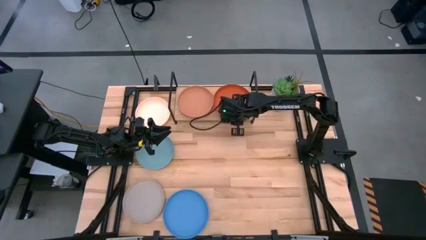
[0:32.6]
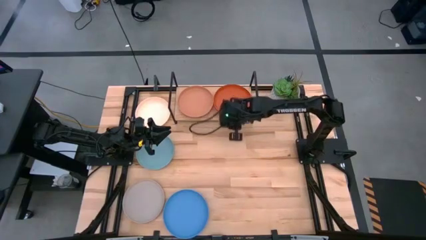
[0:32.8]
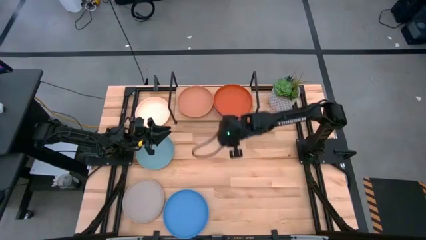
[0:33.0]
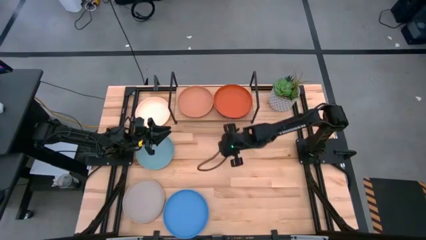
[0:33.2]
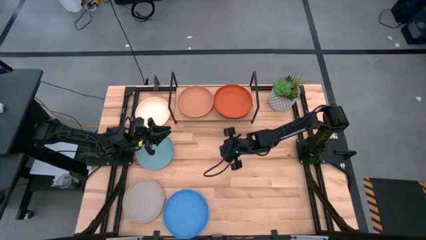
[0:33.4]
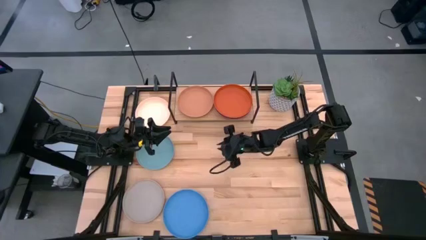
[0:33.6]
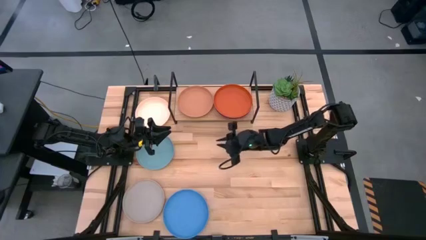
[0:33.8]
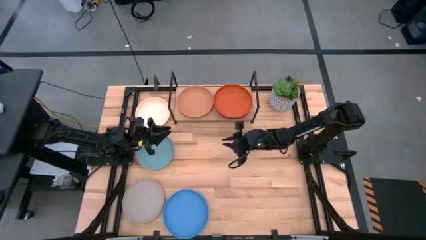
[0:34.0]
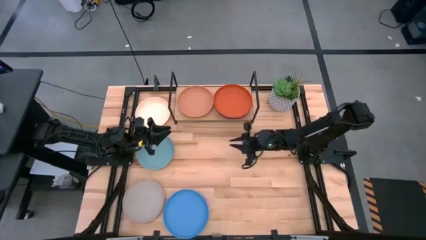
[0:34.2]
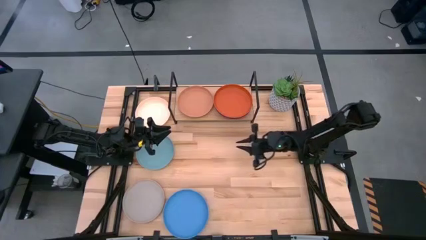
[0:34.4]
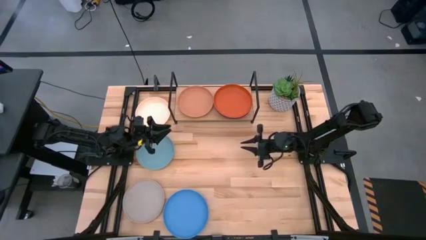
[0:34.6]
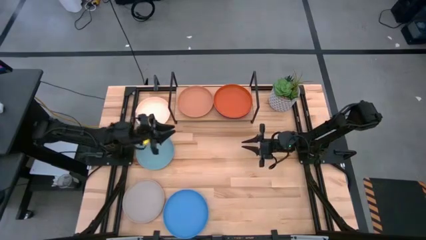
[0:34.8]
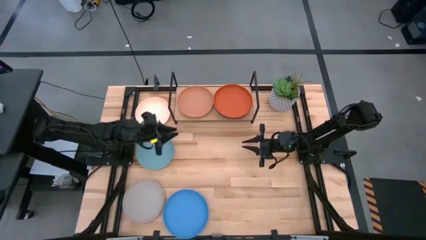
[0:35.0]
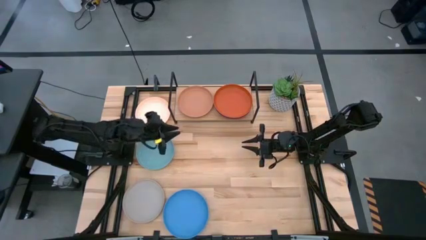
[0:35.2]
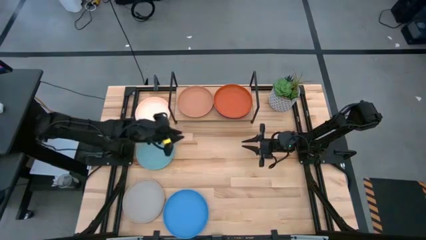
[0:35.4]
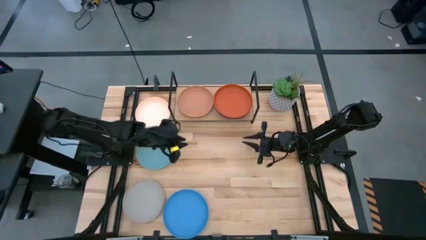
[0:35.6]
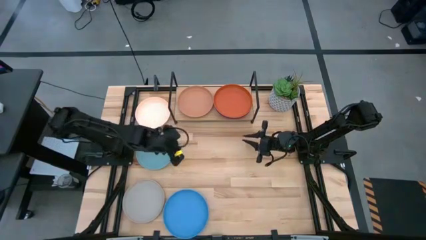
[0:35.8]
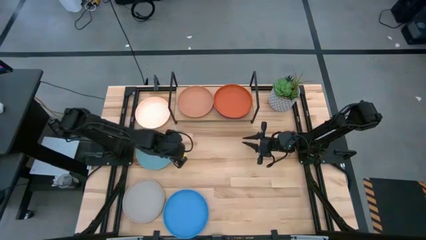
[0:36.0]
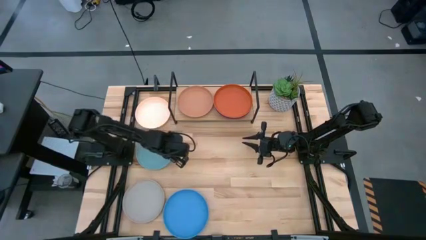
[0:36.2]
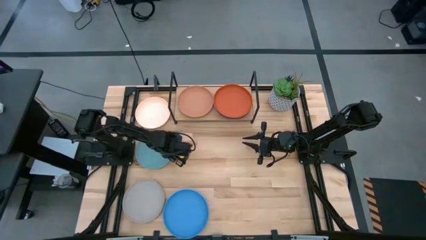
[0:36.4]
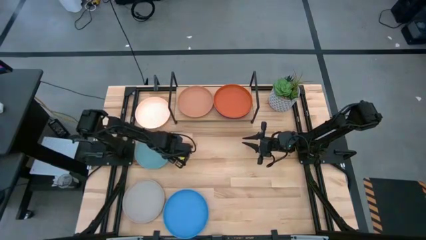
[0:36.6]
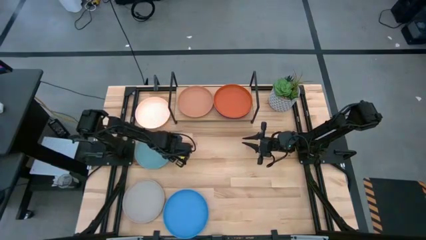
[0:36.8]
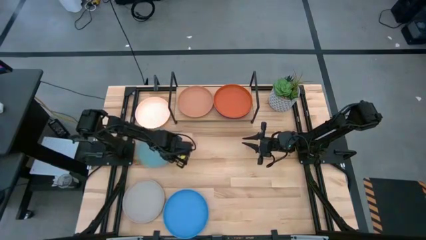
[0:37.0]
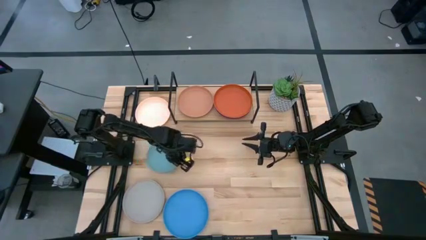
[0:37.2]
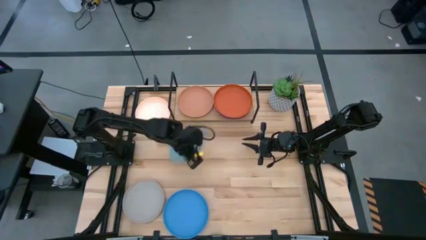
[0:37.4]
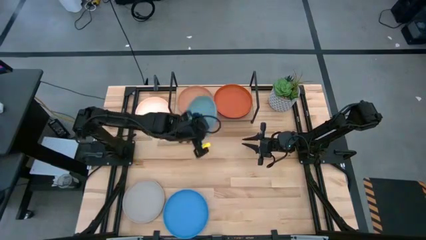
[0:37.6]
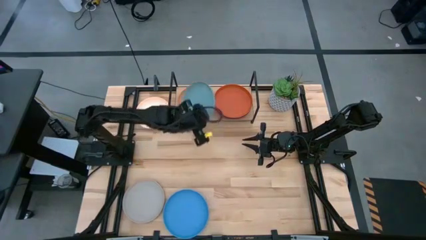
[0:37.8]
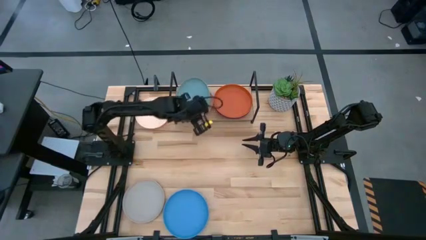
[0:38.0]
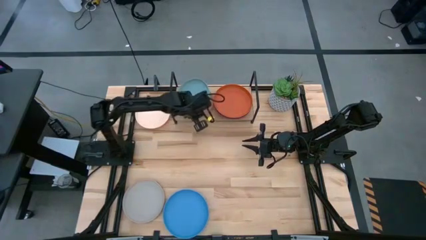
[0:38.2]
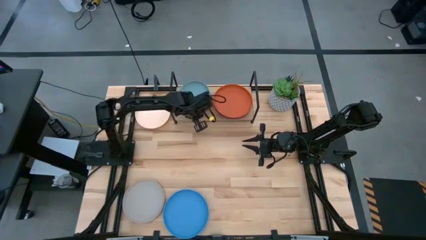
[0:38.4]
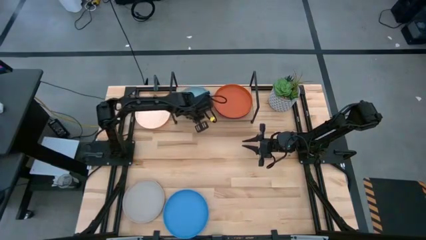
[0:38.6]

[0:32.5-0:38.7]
Task: Place and stack plates onto a shelf
Stack the light blue plate on top of the brown plate on the shelf

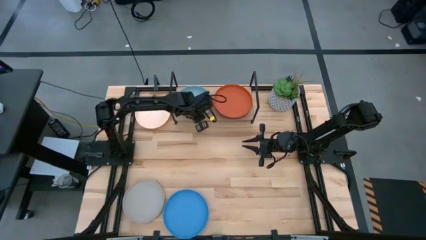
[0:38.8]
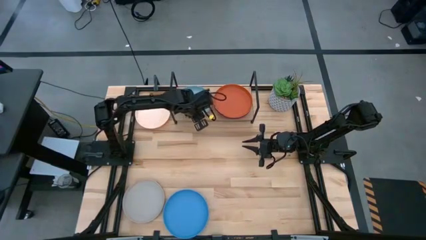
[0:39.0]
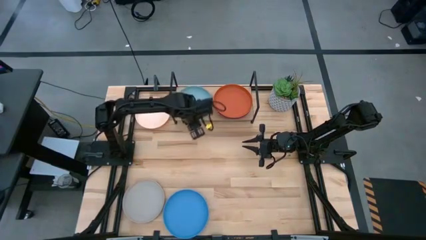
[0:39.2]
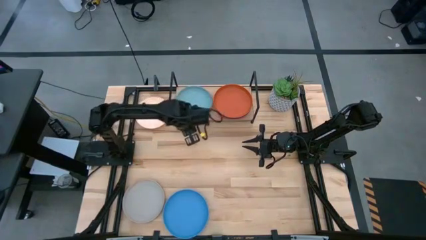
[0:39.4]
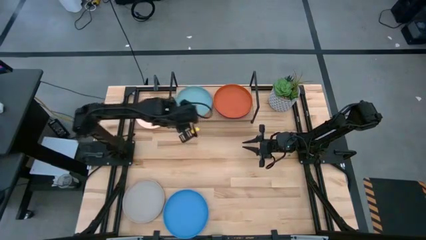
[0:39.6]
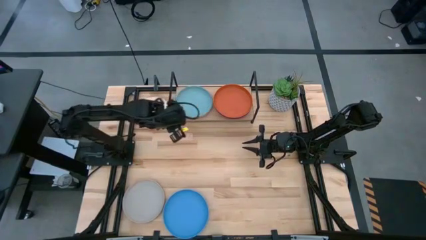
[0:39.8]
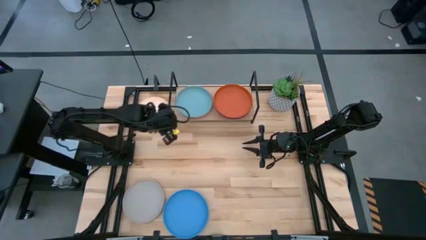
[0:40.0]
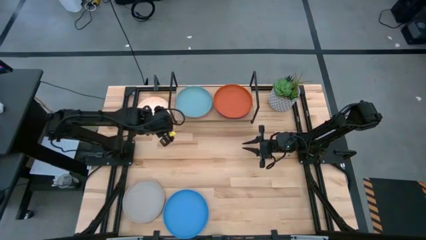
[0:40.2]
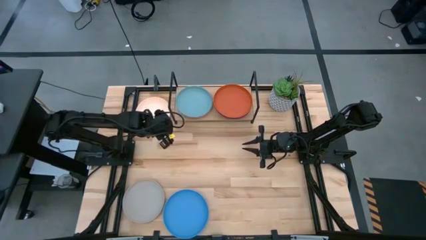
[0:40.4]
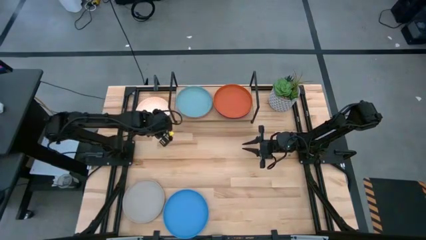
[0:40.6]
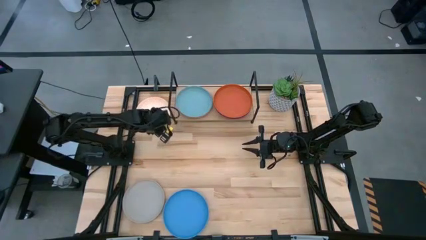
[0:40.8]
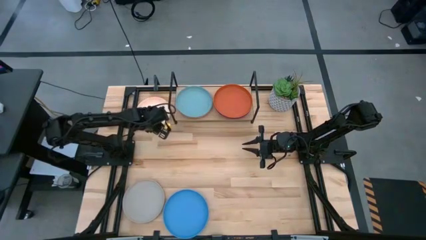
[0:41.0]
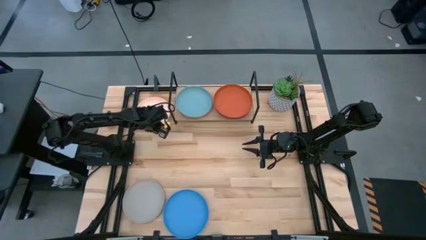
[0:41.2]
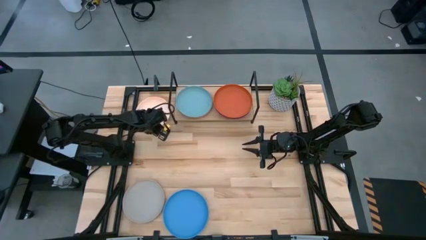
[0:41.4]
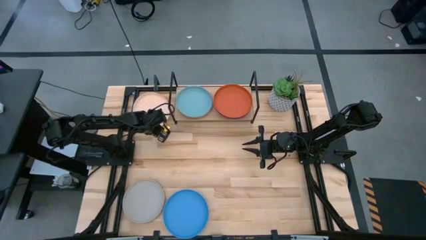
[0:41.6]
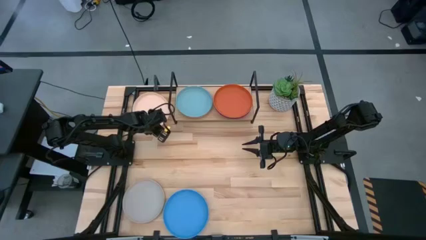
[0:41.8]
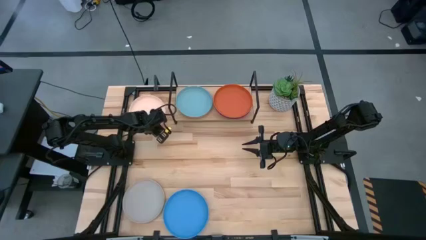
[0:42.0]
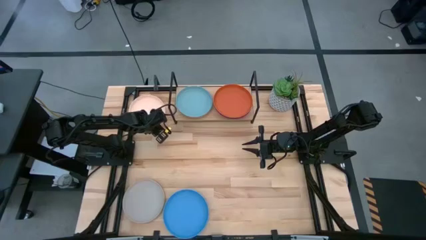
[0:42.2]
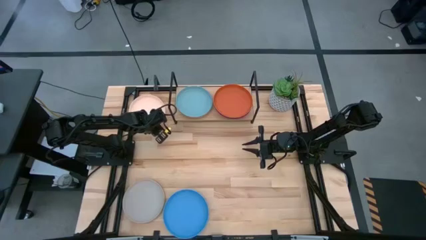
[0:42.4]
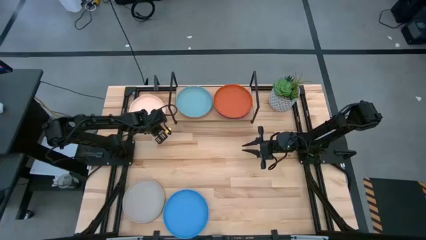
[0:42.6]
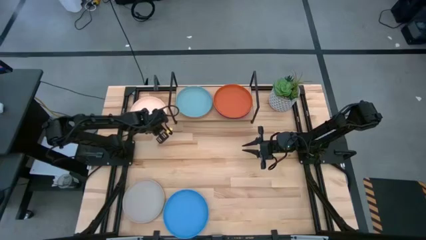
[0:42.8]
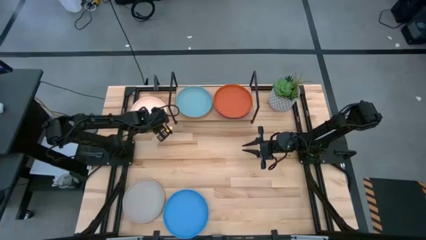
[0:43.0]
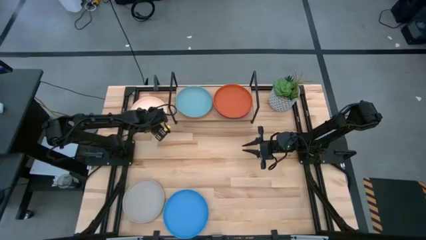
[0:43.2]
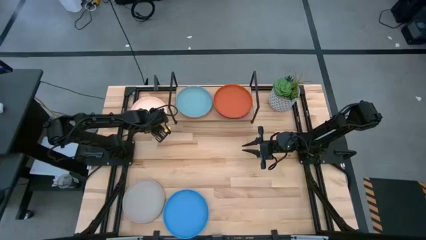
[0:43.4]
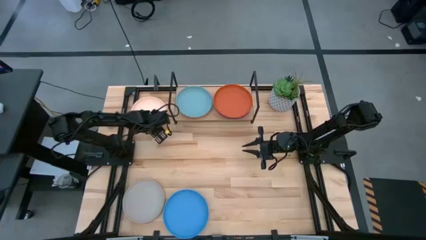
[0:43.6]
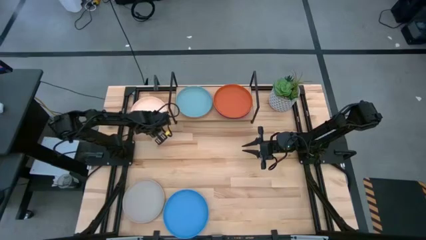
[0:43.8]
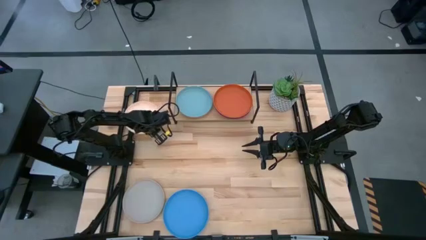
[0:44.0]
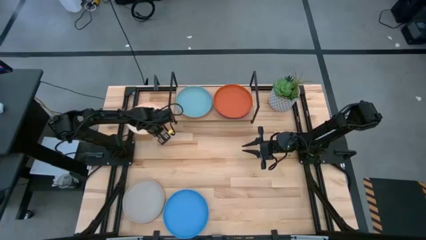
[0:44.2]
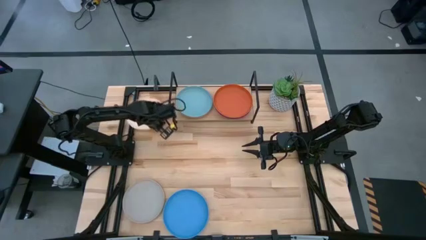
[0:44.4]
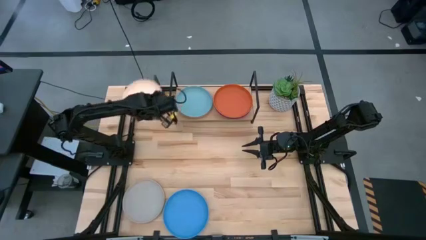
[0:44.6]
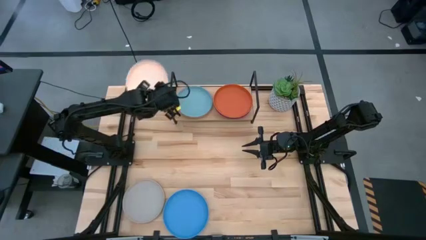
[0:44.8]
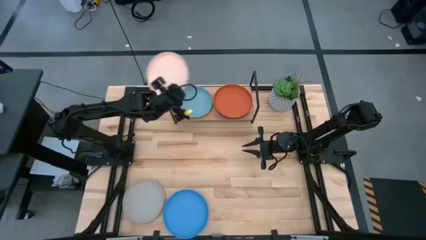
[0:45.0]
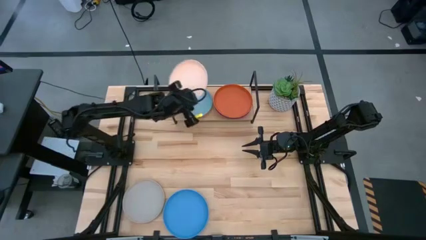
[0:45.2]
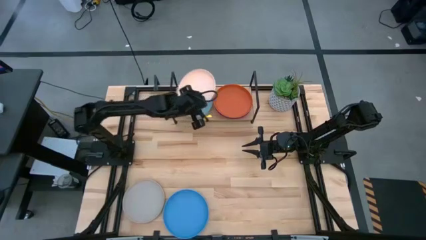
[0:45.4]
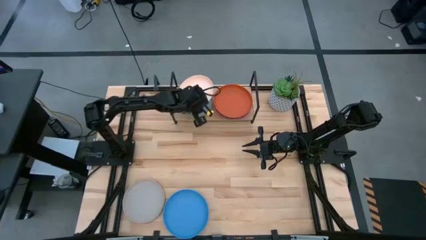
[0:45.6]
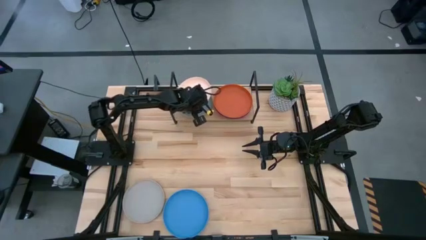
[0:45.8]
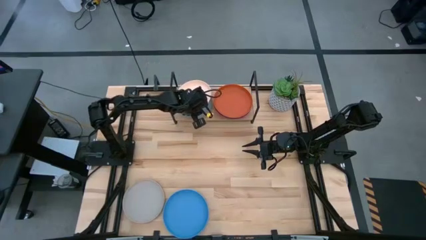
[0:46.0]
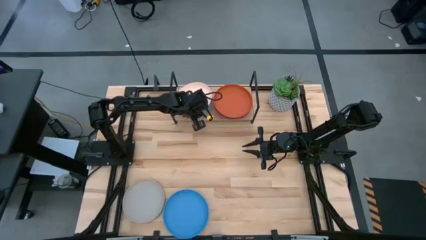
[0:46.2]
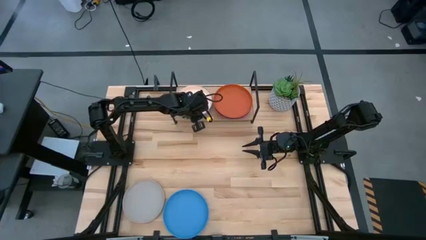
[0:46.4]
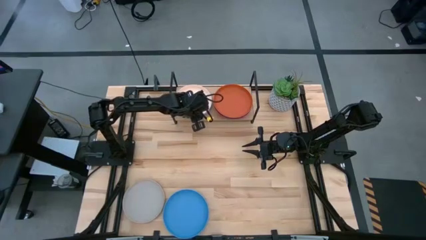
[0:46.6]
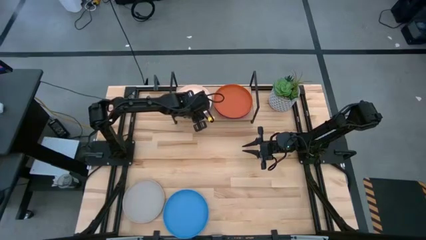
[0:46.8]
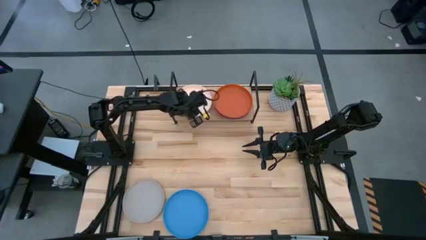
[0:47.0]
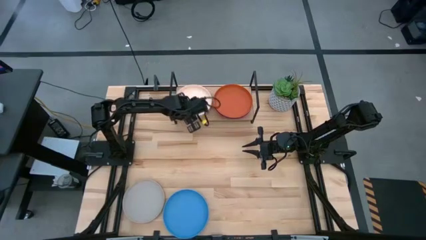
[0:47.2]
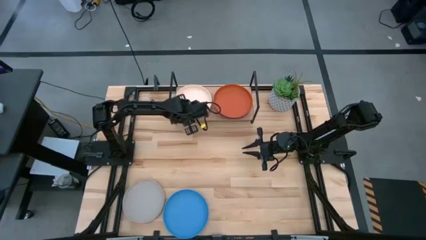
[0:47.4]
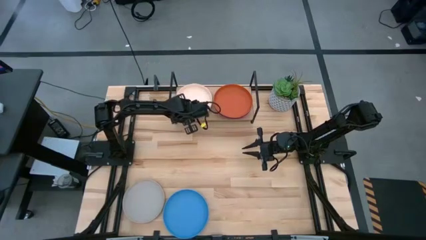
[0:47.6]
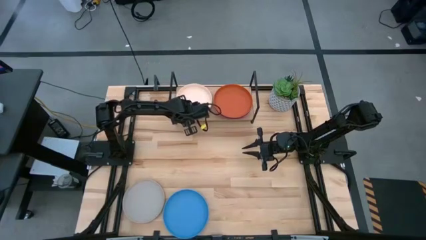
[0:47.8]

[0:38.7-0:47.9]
Stack the light orange plate on top of the light blue plate on the shelf

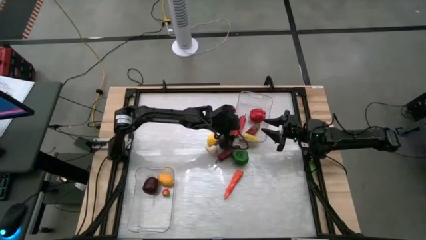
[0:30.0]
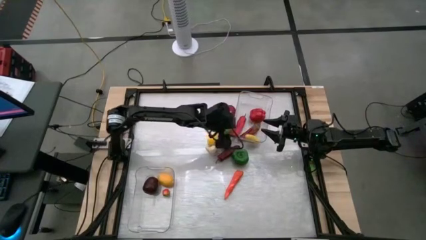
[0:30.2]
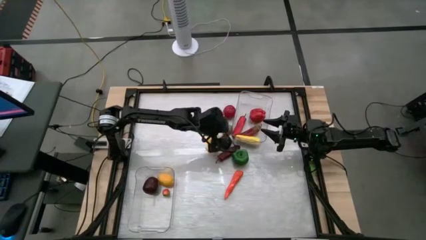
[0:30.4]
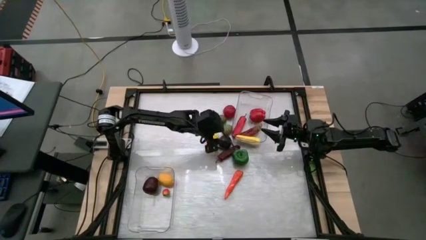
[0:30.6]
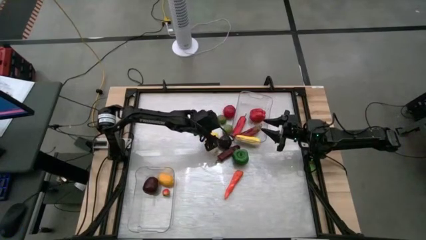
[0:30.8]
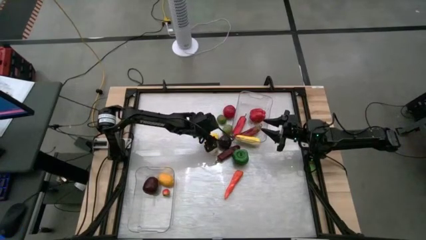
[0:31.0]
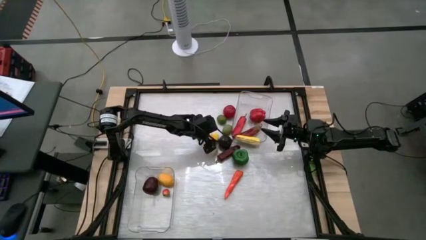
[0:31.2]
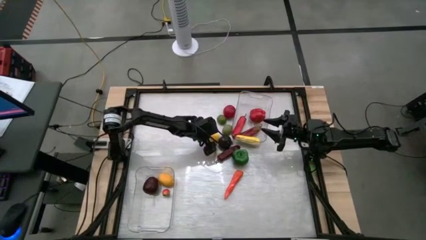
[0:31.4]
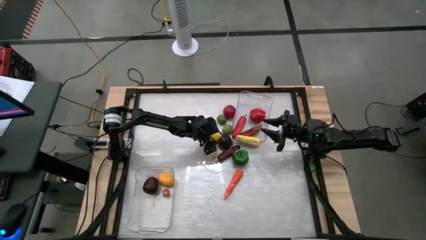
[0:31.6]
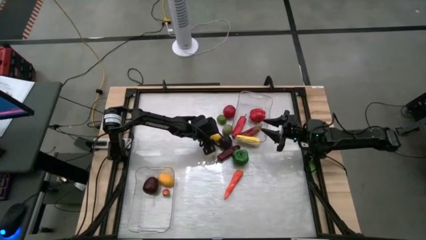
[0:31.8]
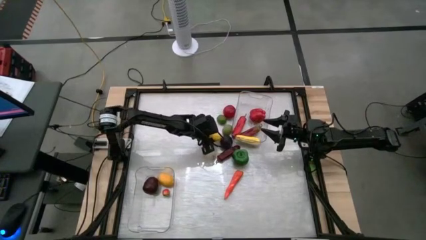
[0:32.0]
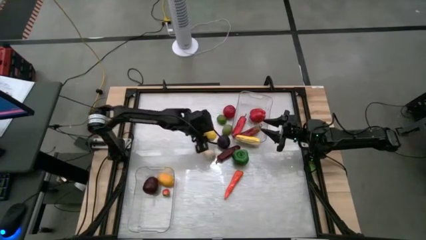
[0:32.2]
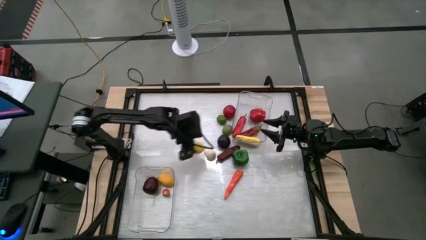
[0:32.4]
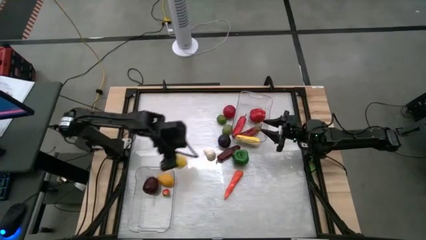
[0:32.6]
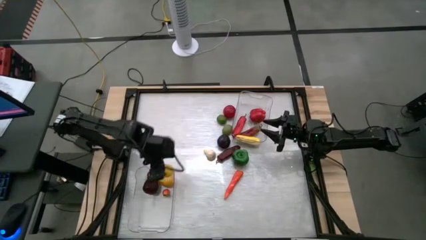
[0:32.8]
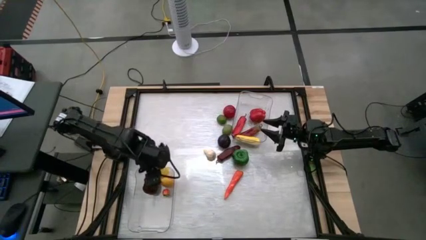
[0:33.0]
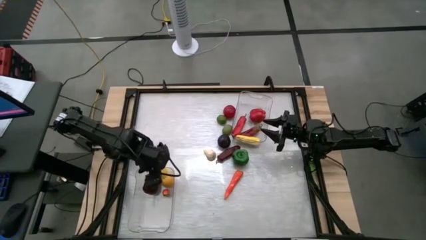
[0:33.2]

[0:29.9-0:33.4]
Task: Sort produce into baskets
Put the yellow lemon into the bottom transparent bin
